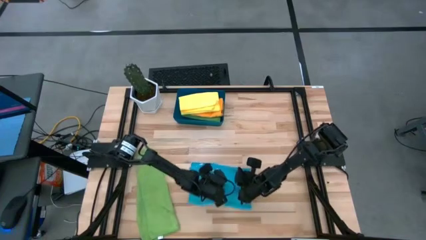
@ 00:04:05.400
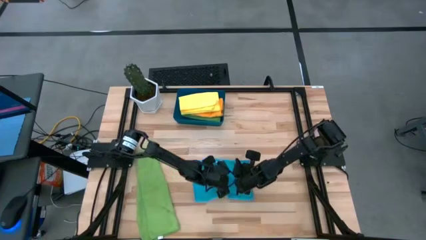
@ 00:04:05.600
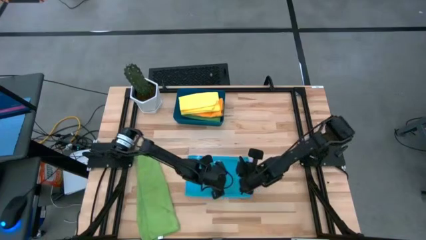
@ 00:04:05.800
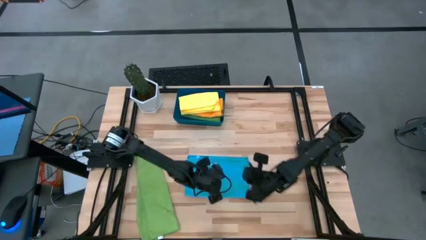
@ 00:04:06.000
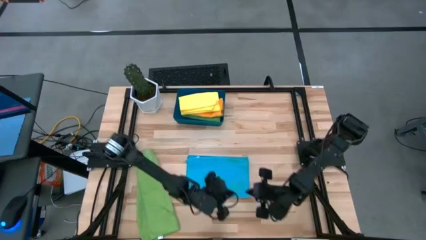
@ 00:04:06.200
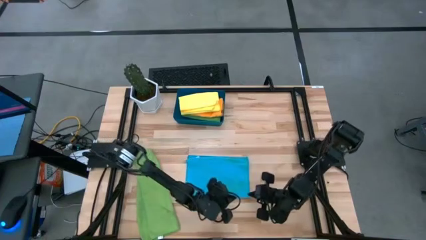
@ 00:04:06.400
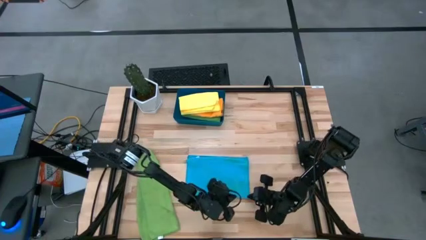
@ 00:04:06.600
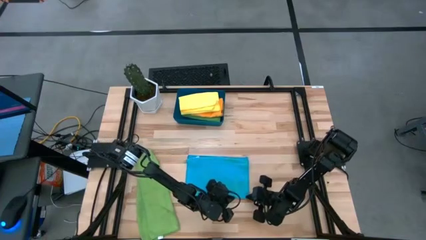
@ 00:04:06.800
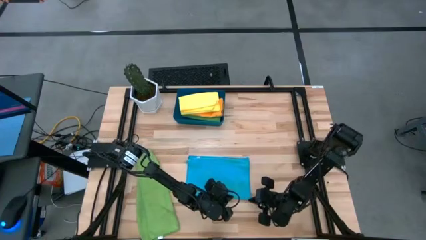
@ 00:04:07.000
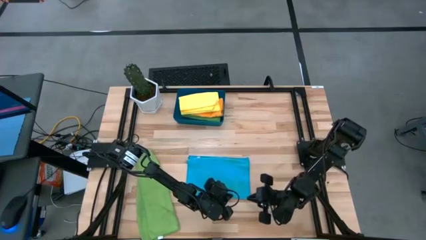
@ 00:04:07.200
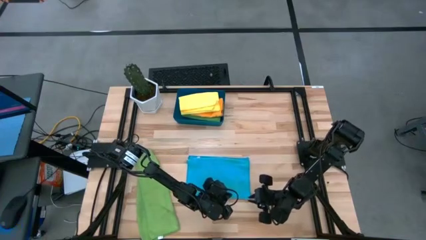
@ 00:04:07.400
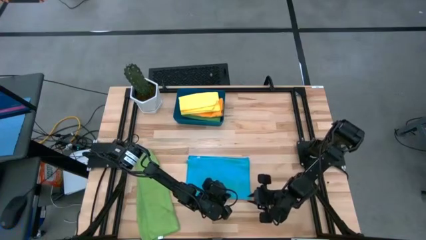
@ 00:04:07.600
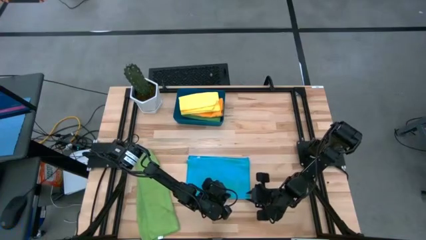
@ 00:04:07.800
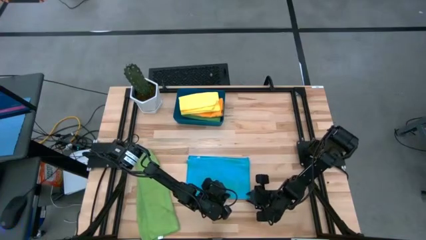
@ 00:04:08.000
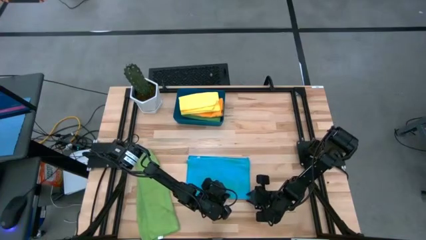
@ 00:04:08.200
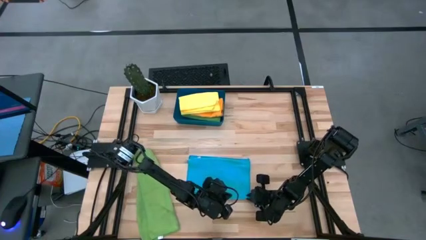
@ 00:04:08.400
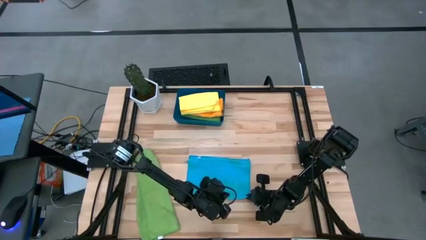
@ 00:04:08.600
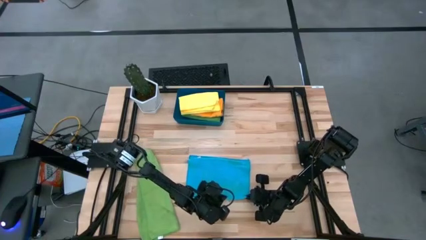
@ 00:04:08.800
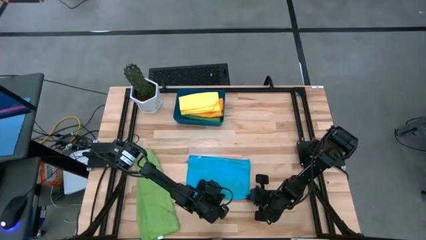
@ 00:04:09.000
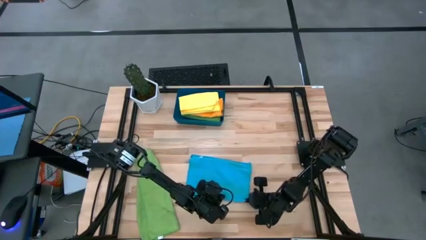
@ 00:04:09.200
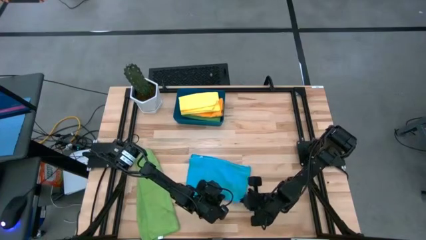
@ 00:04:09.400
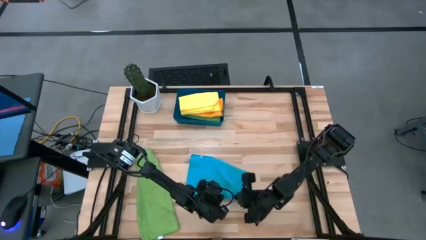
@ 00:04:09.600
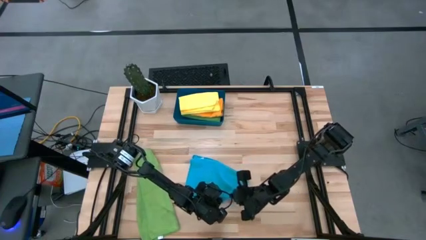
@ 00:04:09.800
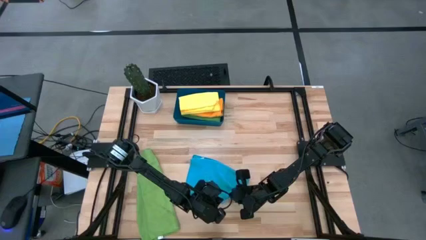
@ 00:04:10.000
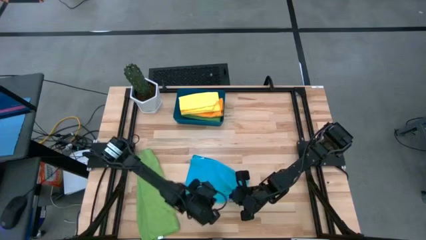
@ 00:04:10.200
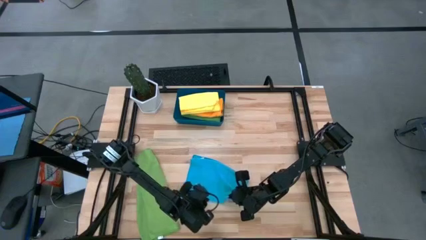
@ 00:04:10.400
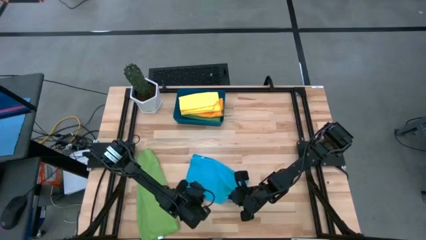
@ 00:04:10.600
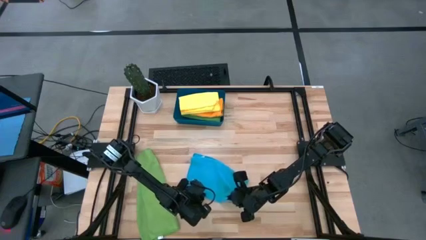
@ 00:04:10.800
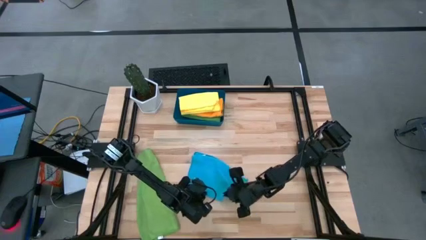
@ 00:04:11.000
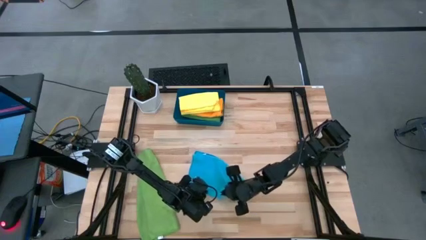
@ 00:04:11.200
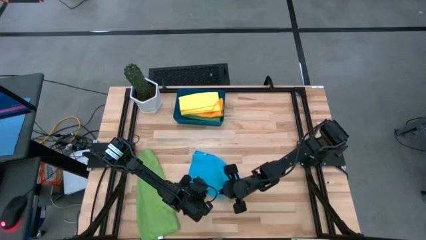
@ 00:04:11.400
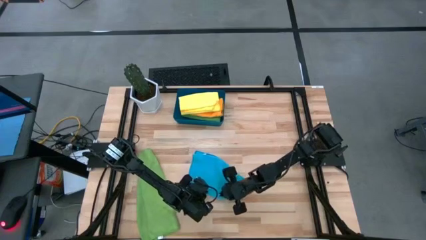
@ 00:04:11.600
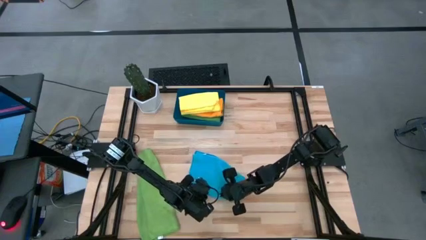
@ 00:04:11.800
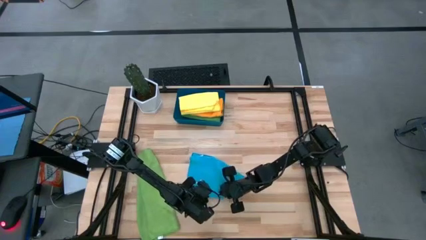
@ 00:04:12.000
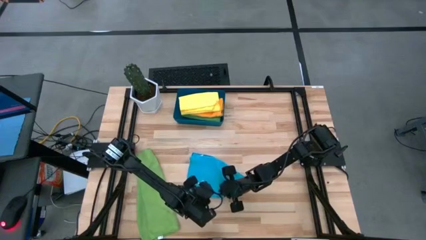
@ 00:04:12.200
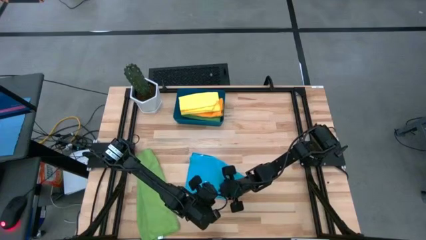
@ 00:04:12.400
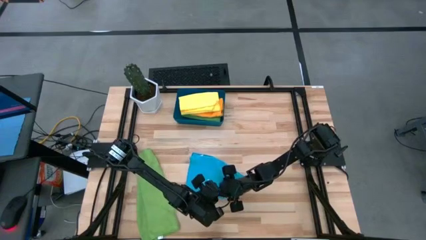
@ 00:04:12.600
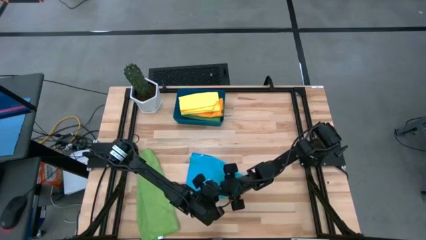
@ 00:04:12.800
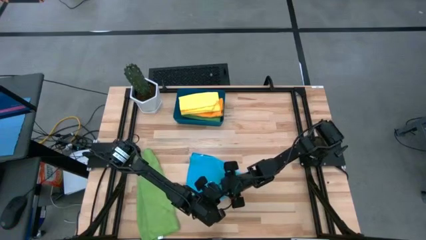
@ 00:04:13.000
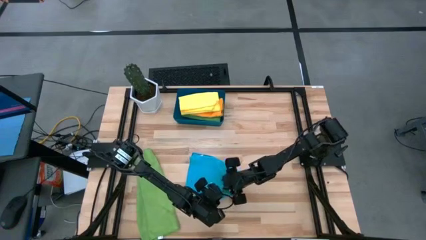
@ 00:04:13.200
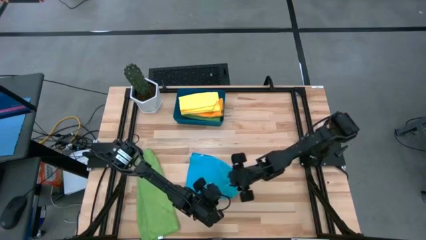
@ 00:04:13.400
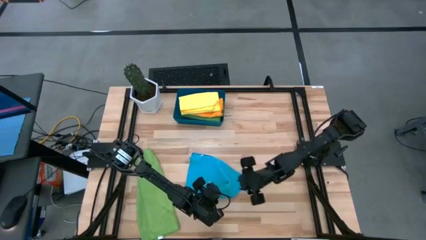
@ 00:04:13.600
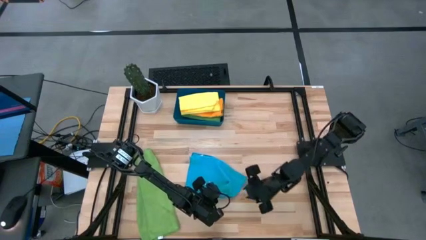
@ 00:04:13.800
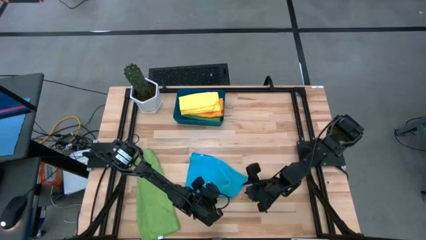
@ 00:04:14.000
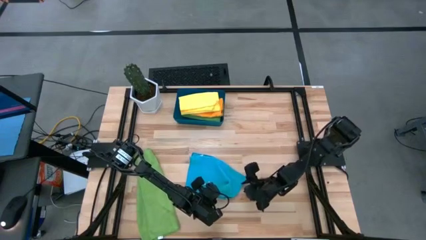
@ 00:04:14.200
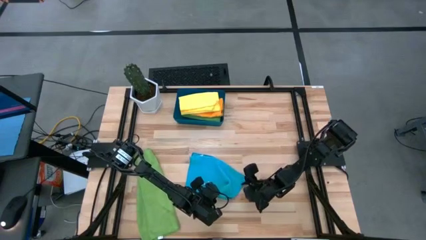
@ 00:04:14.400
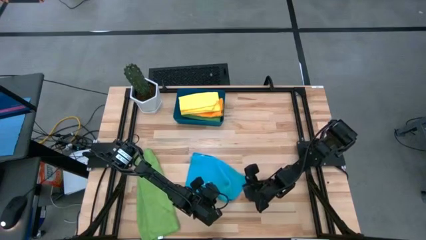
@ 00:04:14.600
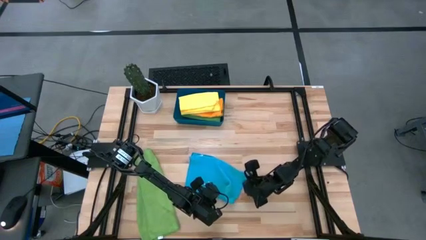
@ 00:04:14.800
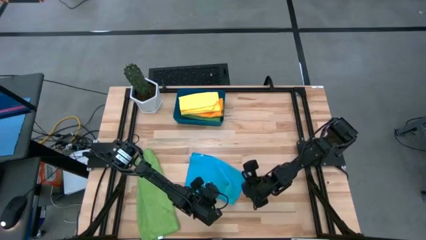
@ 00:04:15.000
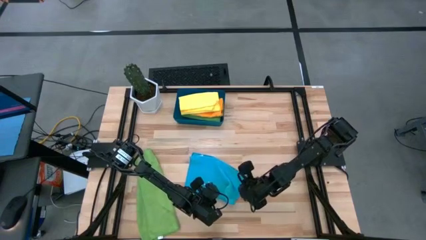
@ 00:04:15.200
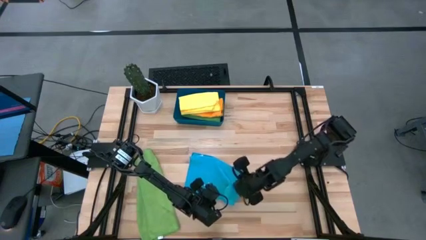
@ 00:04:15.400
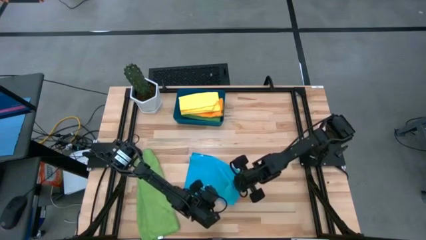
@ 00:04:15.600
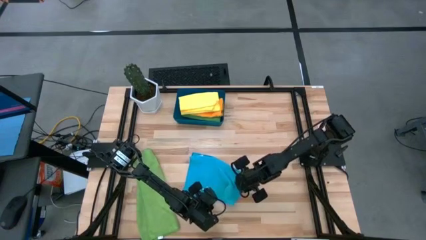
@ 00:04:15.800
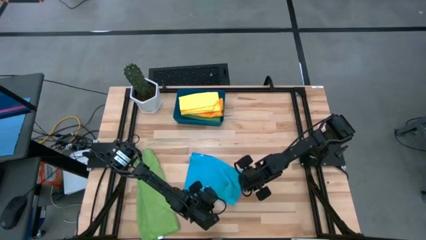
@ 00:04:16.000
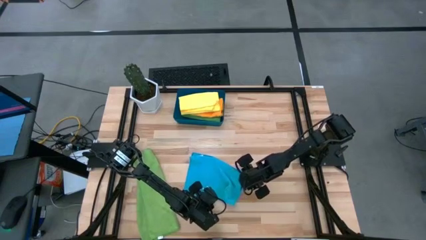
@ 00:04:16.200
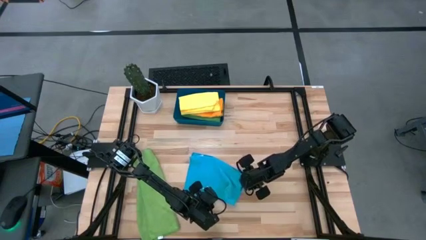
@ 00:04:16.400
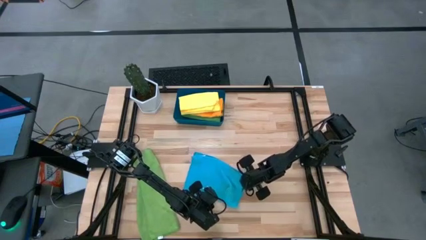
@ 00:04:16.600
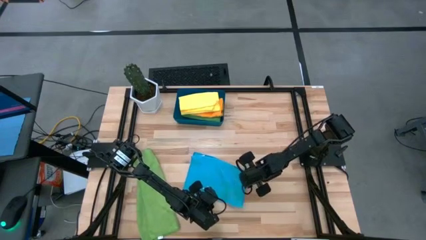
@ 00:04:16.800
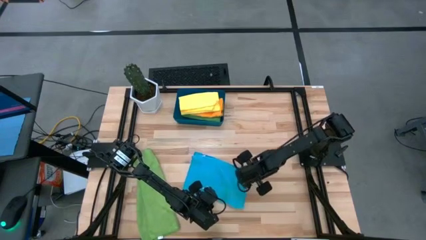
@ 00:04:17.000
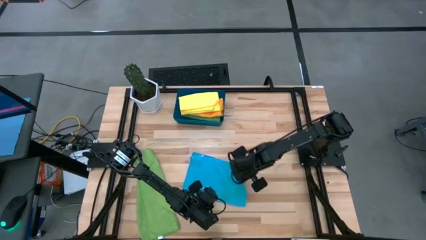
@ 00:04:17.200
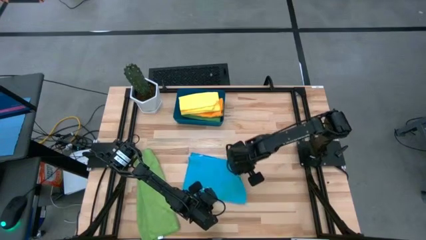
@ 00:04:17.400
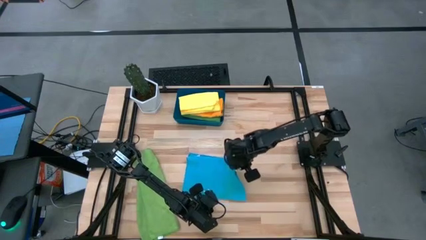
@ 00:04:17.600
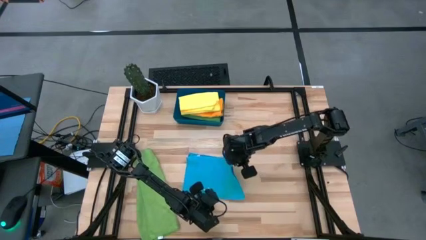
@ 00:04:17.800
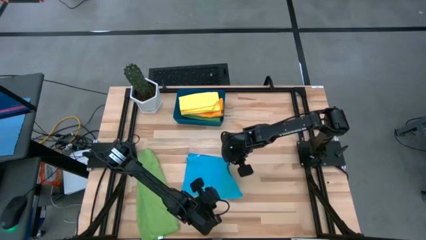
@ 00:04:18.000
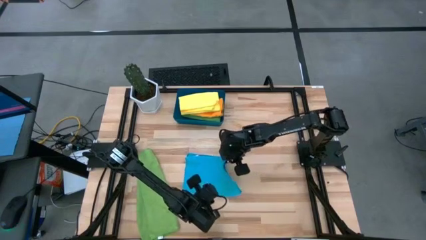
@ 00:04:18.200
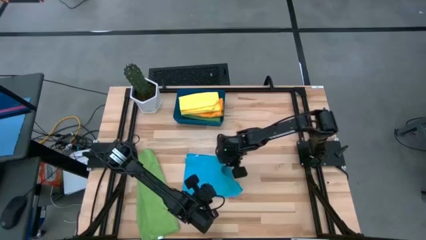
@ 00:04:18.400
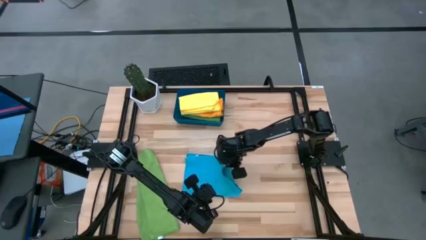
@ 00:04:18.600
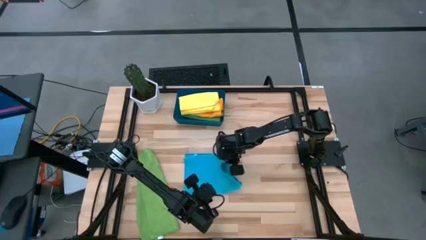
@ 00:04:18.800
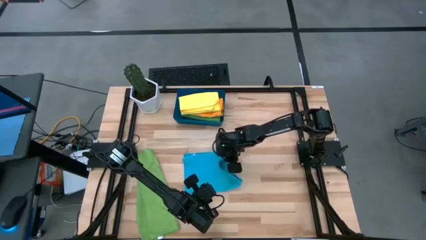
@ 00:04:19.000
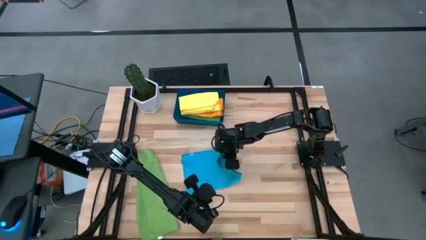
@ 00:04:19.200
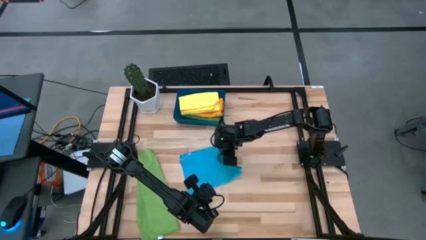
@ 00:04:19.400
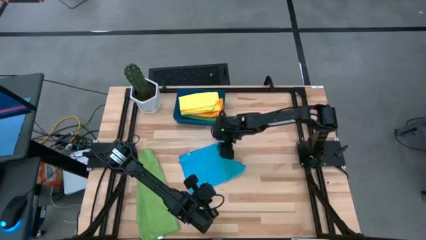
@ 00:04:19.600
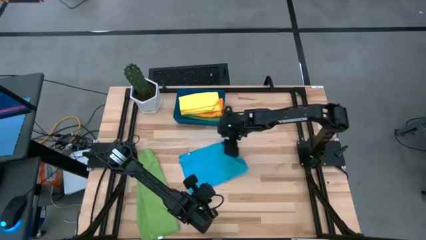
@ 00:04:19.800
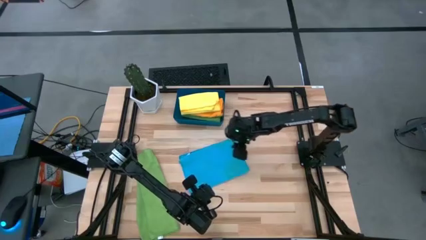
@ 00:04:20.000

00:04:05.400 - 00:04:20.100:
Task: Fold microfiber towels
Fold the blue towel
